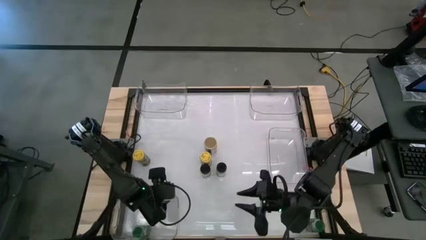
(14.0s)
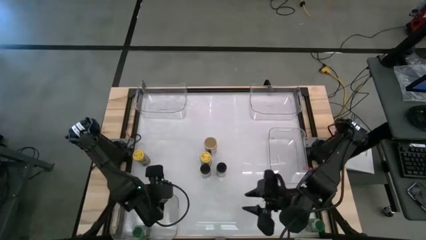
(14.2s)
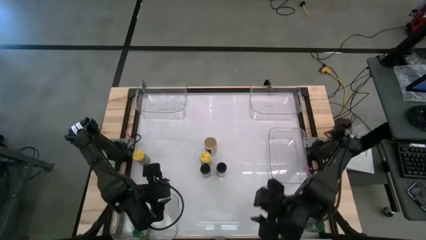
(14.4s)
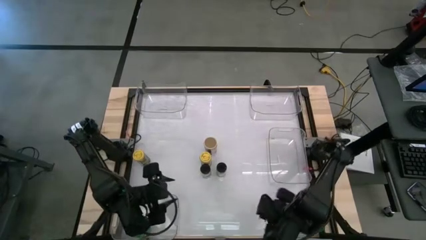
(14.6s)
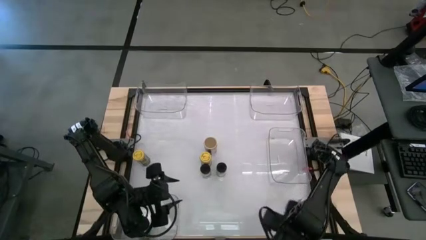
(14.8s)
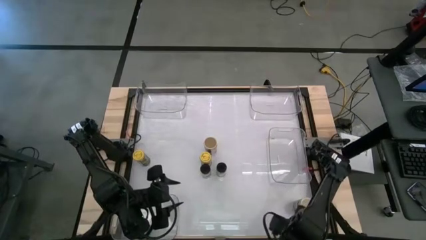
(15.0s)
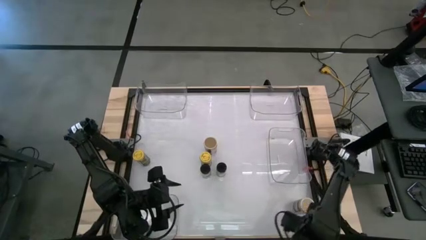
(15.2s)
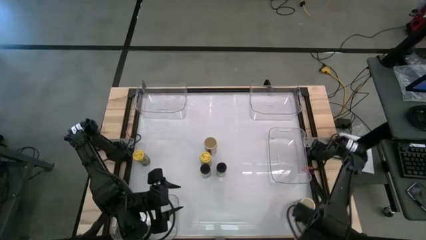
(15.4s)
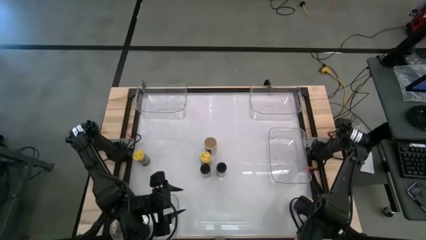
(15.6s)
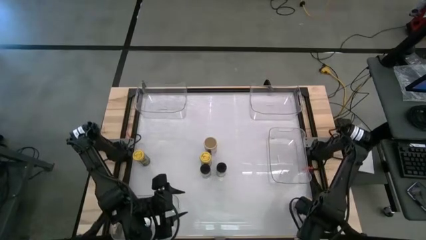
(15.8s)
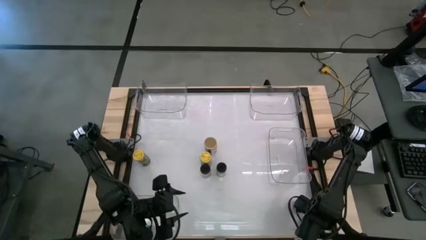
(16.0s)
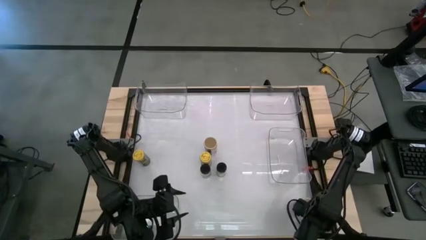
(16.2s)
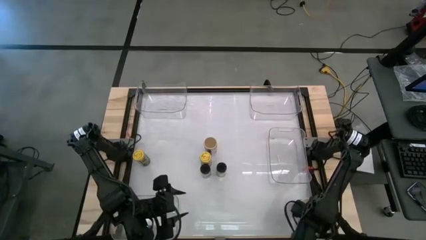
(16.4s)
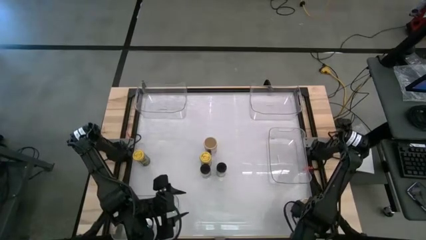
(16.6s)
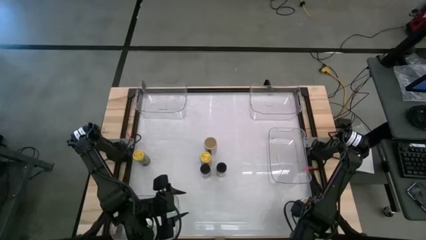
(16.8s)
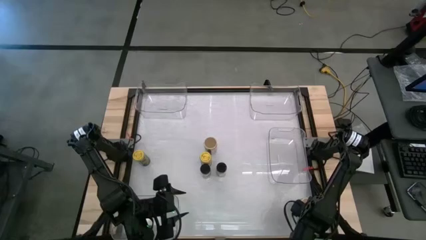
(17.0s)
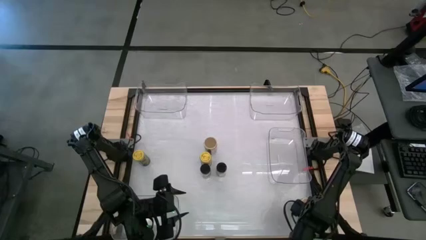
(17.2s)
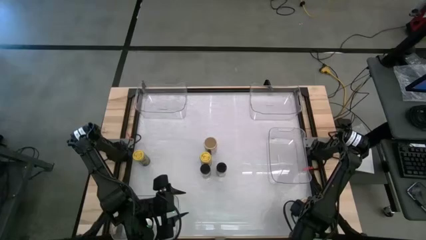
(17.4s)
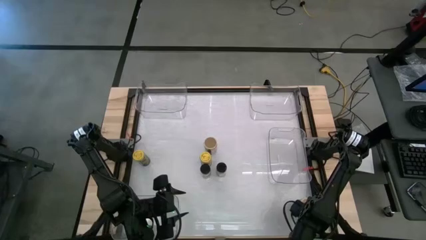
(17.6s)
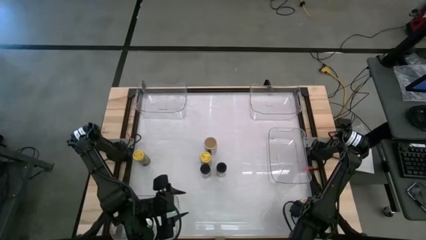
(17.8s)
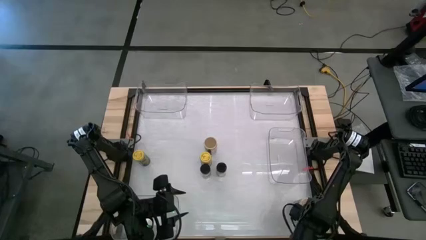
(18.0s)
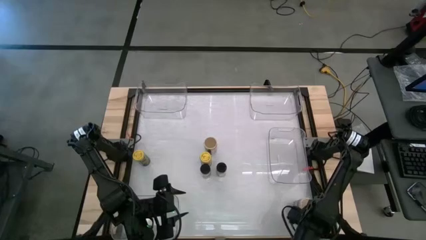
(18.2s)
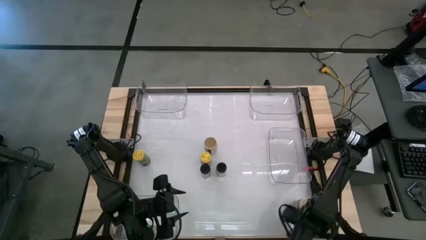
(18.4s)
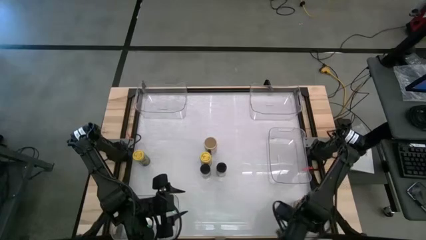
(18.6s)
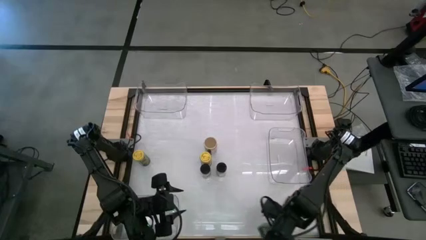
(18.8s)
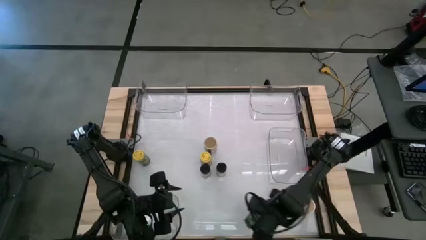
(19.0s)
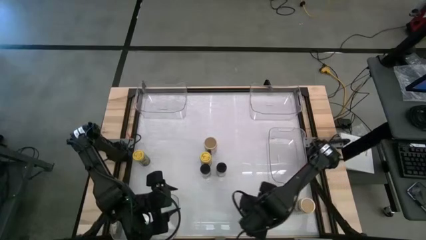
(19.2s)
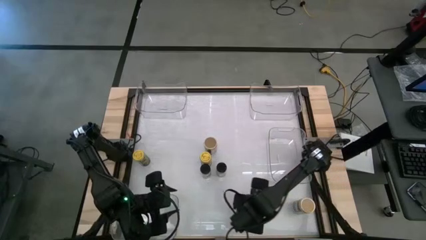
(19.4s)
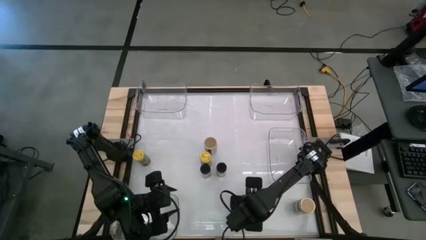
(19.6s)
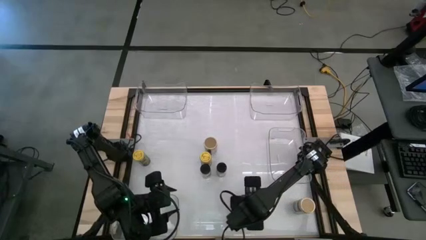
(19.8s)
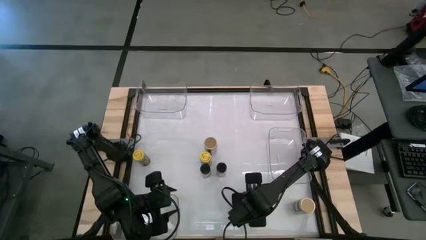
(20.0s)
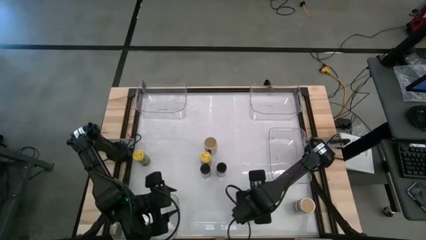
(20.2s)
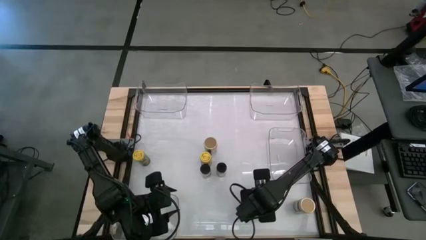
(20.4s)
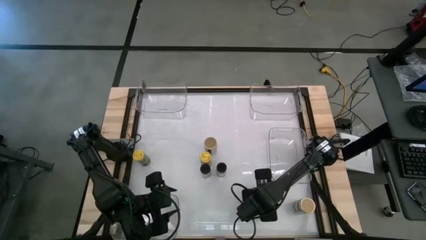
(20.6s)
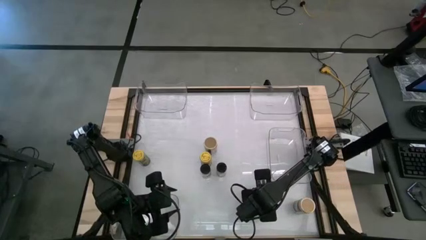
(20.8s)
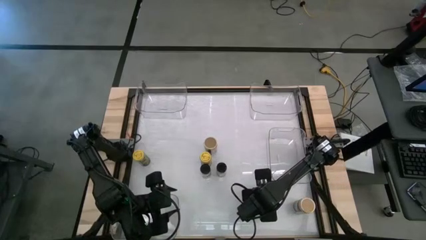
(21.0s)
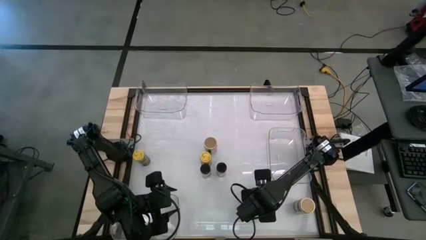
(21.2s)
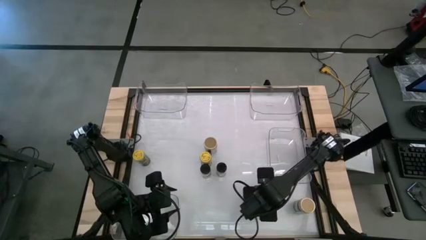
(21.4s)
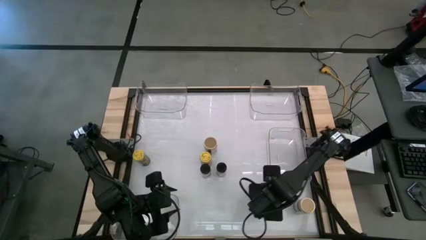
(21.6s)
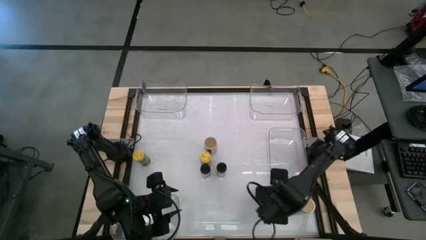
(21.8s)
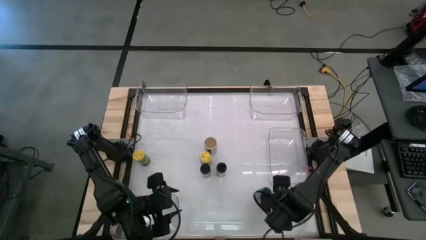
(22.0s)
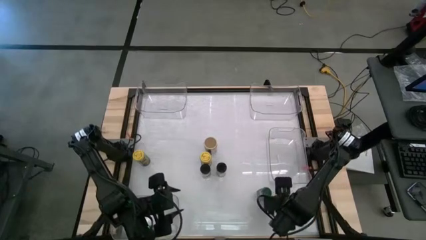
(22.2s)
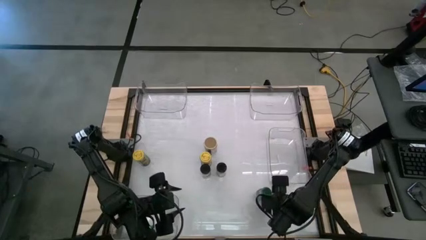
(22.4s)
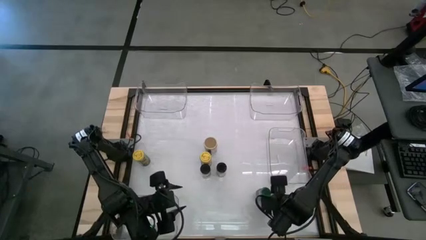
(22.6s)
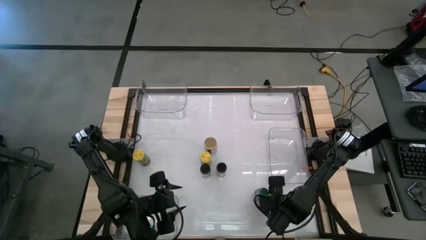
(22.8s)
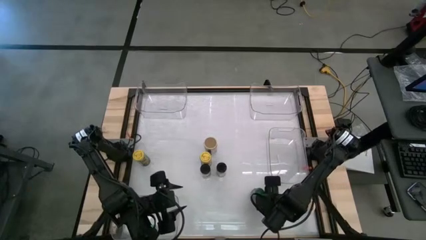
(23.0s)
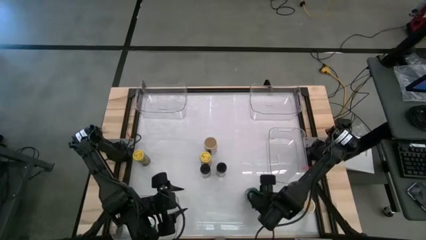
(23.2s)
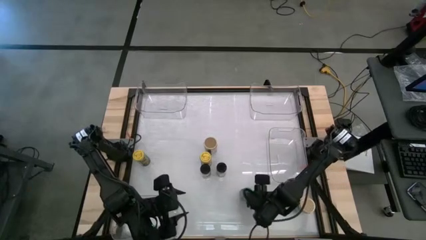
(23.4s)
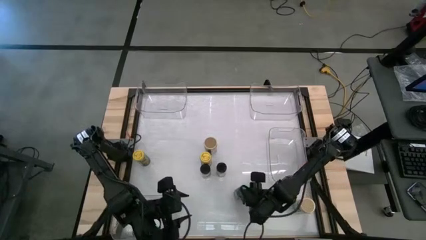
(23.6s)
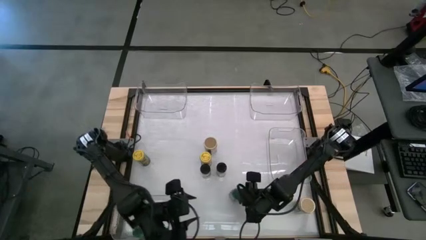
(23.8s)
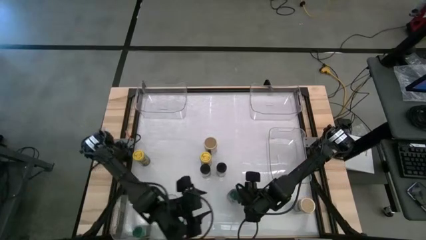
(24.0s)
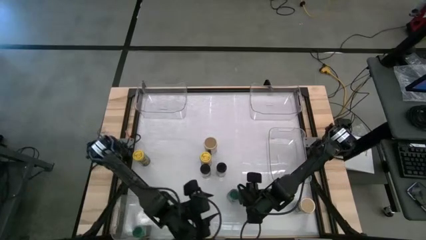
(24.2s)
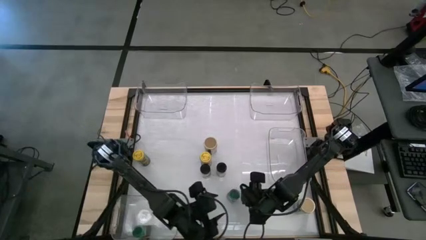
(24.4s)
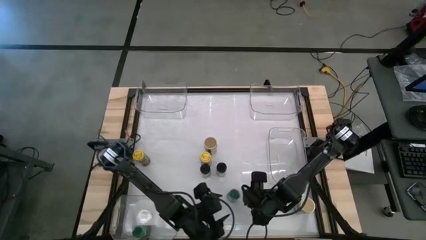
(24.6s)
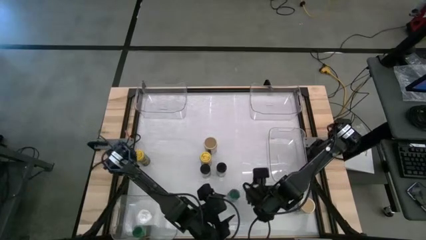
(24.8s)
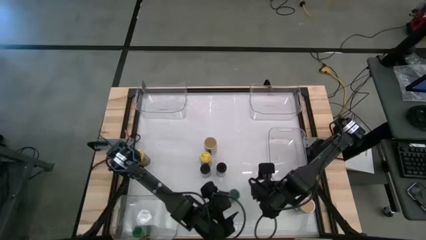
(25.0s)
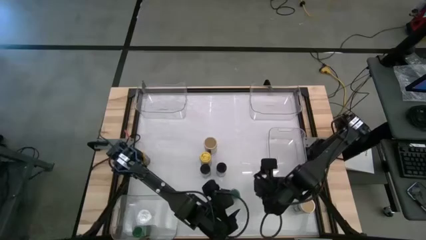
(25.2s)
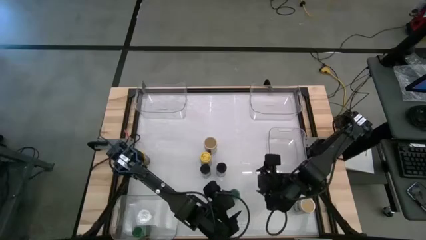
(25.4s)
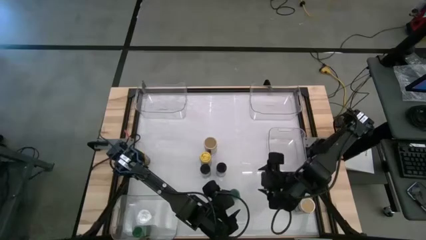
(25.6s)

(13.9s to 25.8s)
Task: Sort spices by type
Put the green seasoning bottle into the bottom transparent bin

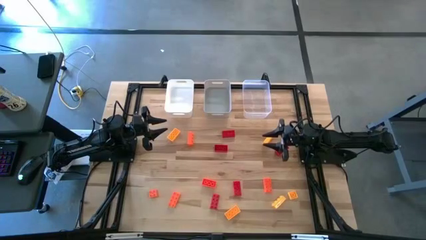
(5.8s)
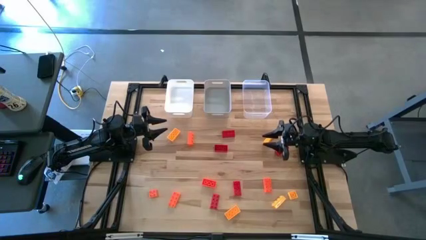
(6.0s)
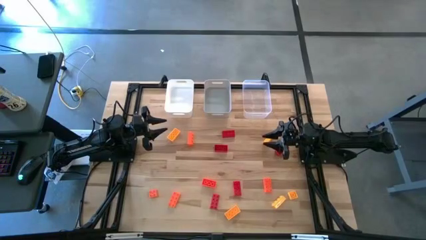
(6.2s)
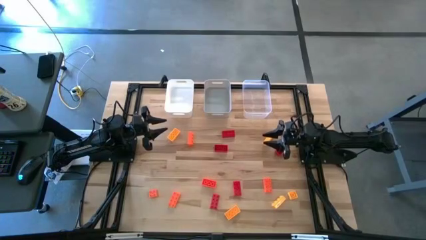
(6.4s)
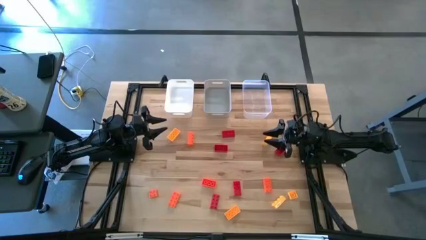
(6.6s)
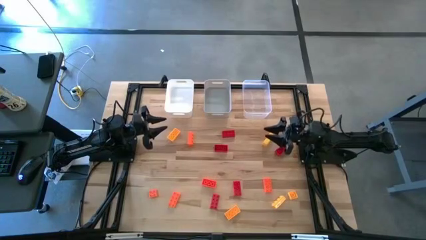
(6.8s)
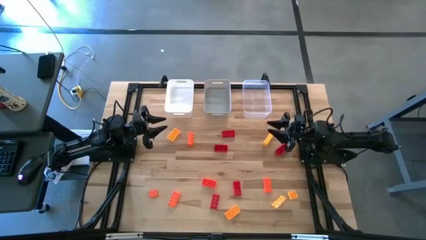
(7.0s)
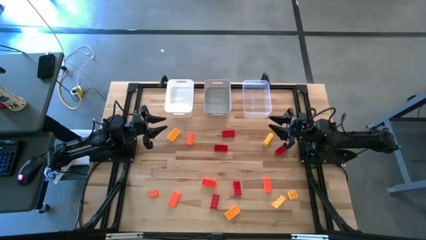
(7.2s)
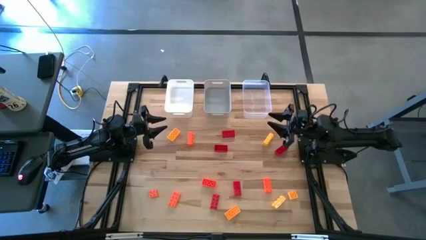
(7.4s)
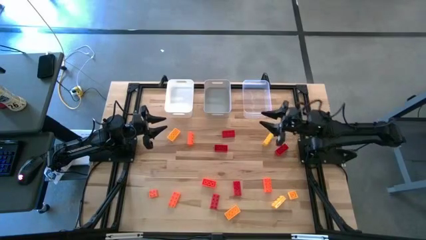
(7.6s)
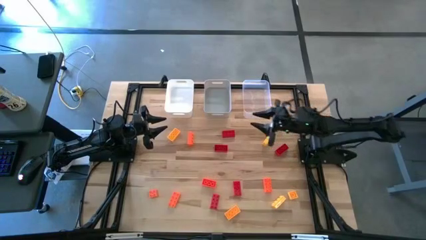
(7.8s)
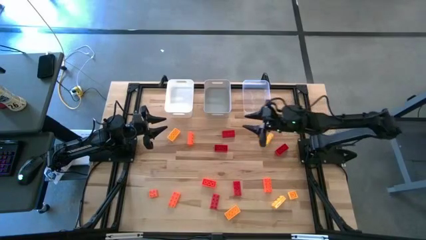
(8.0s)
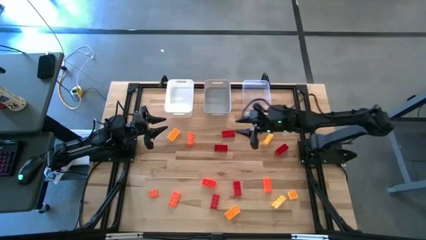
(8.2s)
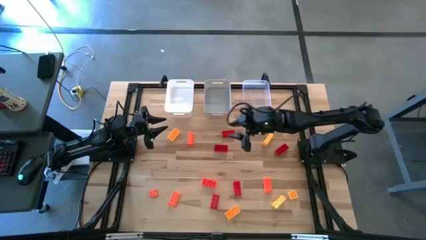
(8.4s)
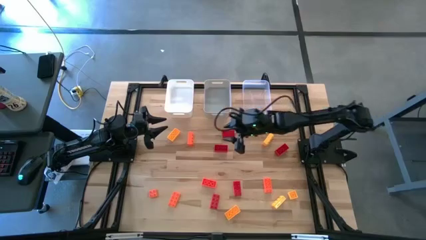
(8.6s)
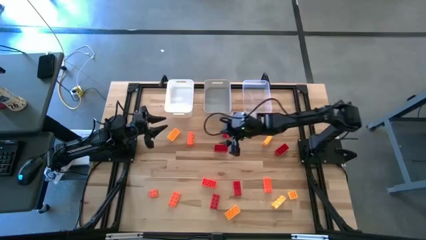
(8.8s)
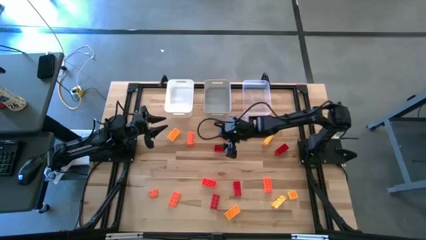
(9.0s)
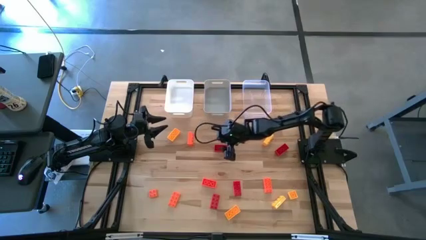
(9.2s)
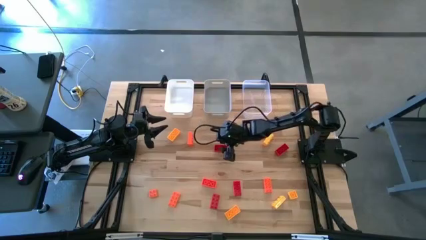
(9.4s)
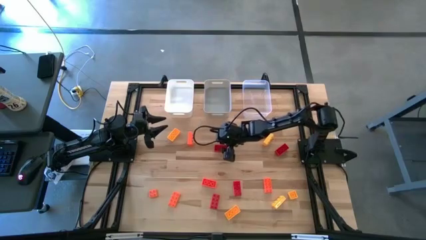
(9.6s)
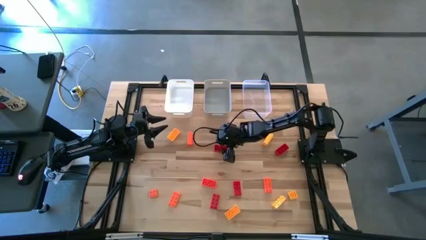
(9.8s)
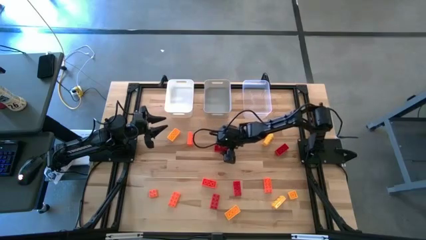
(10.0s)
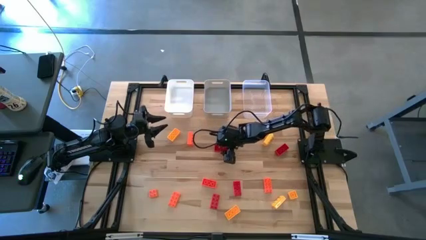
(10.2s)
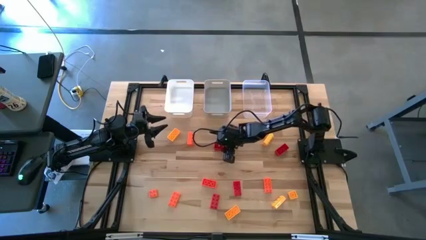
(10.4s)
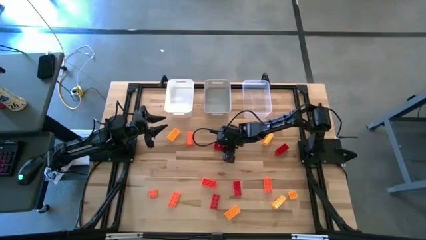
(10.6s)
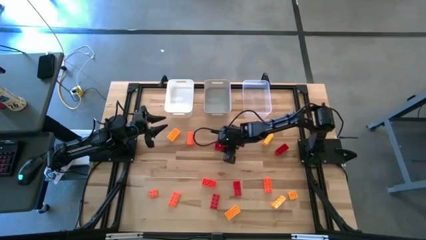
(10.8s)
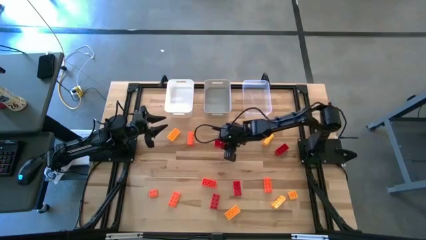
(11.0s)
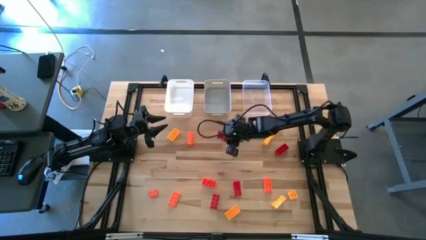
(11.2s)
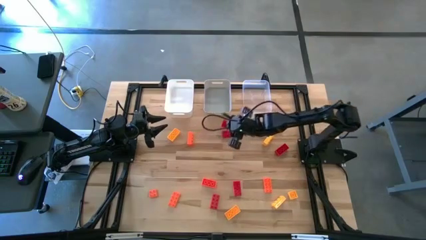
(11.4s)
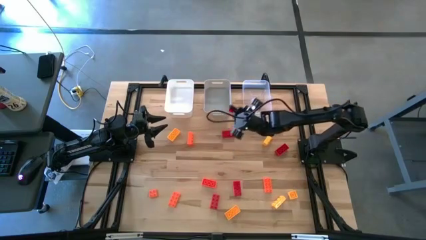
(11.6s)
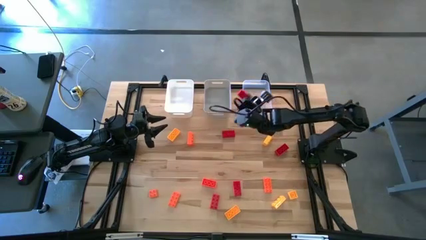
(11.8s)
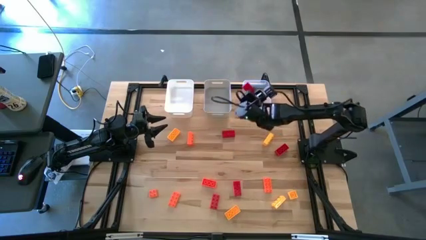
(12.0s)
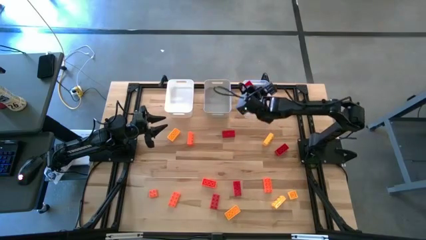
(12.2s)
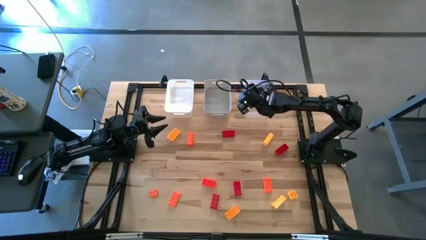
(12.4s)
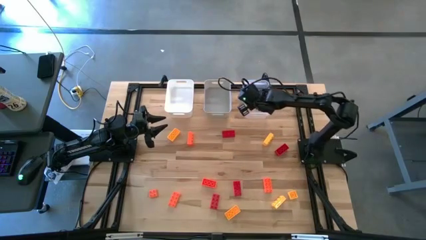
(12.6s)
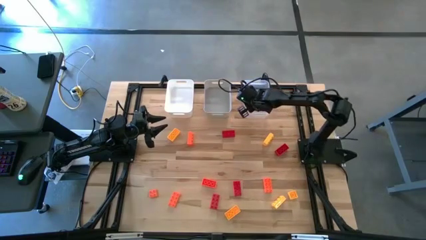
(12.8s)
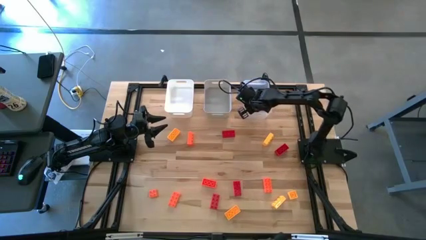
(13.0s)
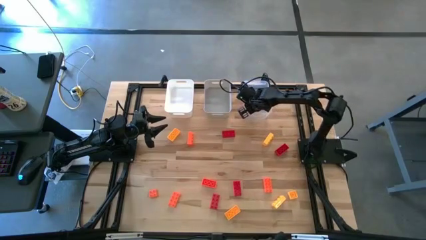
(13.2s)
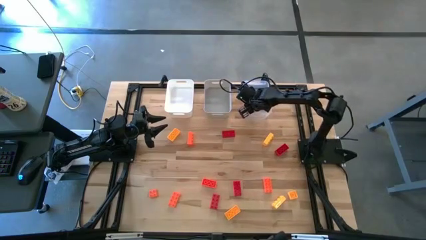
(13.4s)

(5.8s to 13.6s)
Task: Sort & place blocks by color
Put the red game piece into the transparent bin
